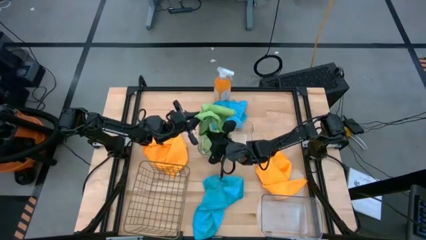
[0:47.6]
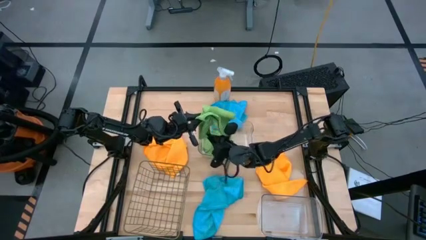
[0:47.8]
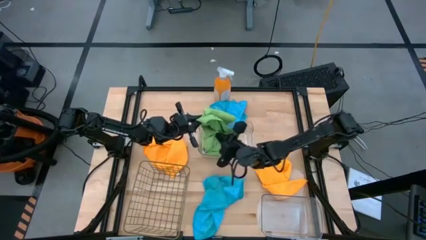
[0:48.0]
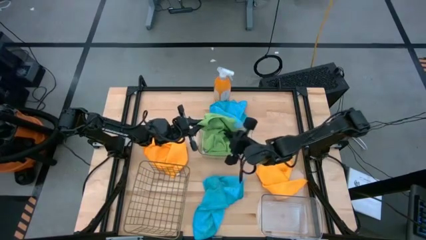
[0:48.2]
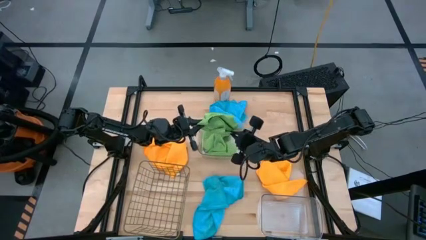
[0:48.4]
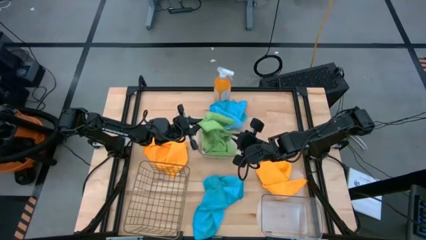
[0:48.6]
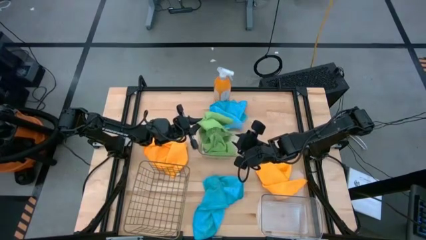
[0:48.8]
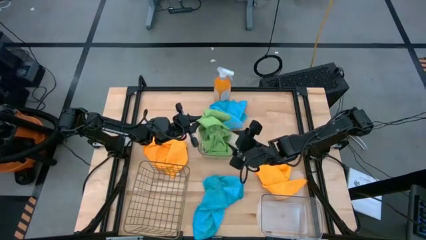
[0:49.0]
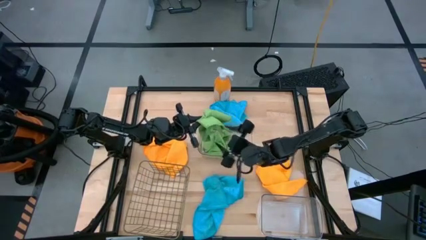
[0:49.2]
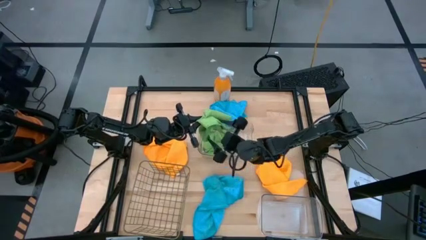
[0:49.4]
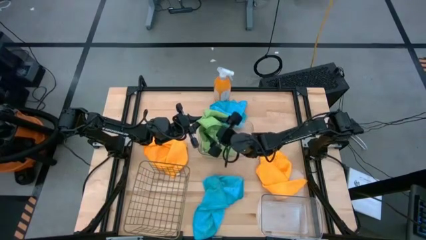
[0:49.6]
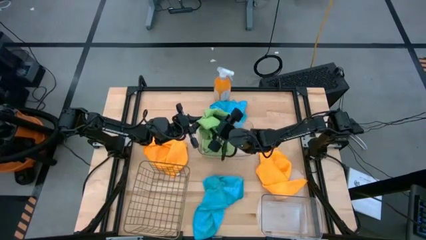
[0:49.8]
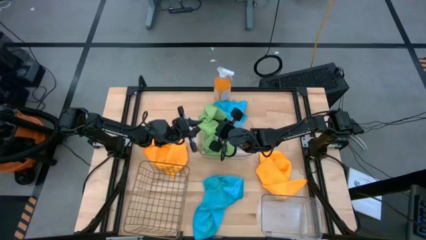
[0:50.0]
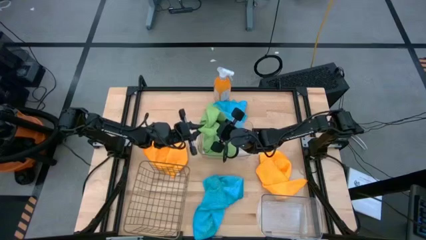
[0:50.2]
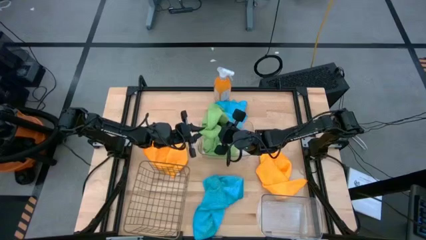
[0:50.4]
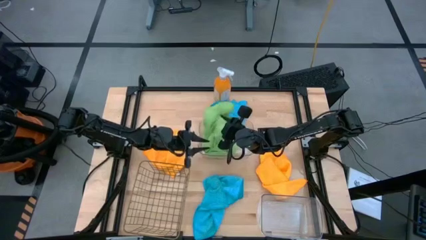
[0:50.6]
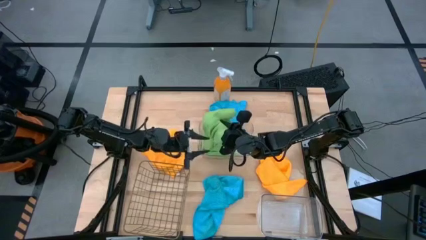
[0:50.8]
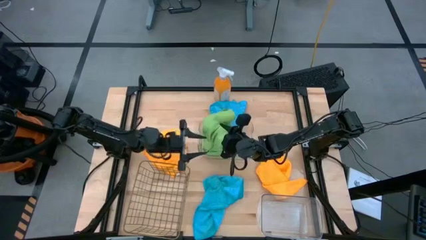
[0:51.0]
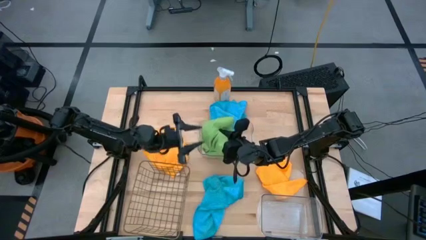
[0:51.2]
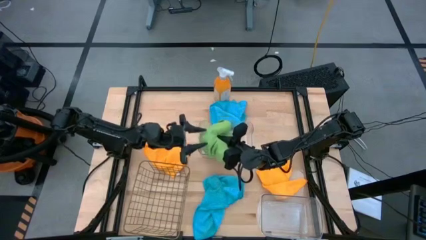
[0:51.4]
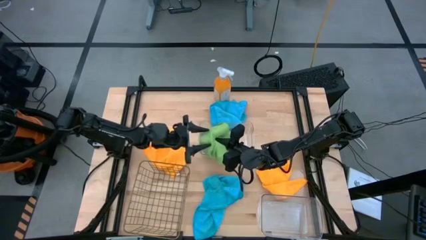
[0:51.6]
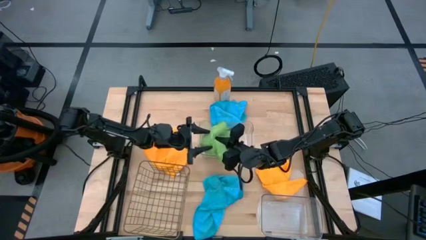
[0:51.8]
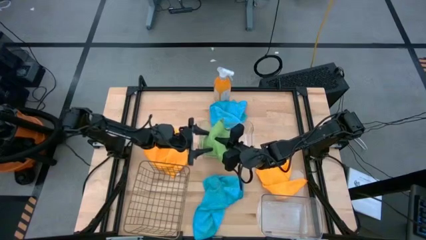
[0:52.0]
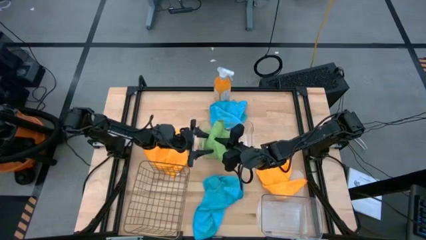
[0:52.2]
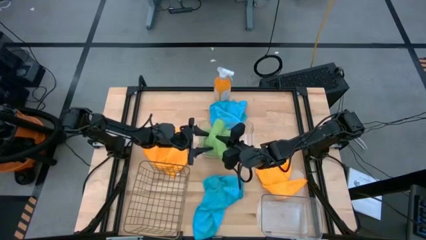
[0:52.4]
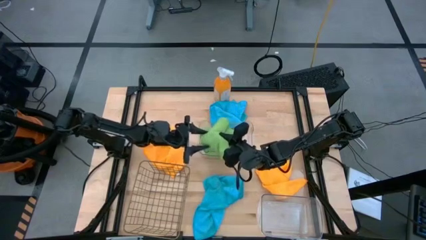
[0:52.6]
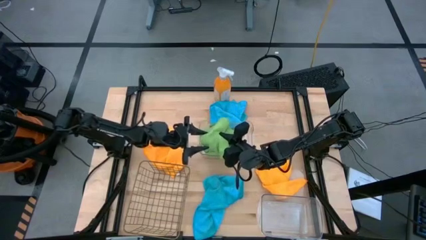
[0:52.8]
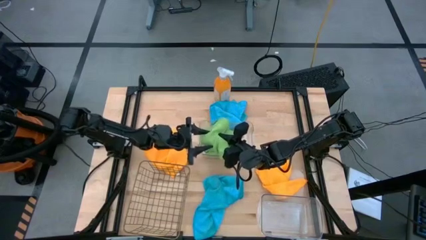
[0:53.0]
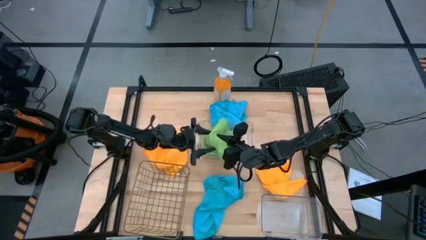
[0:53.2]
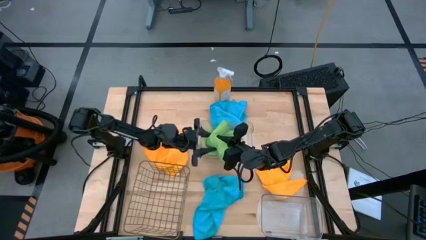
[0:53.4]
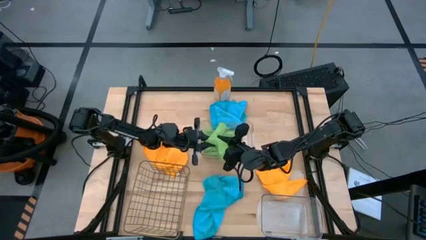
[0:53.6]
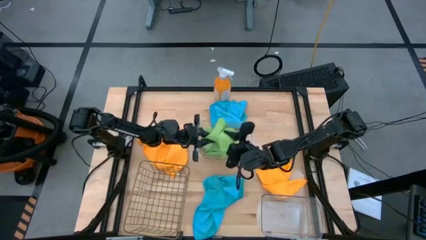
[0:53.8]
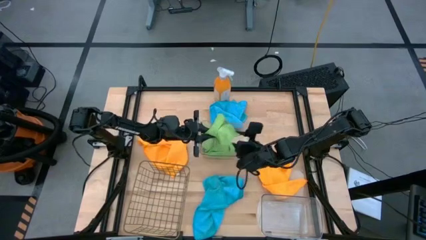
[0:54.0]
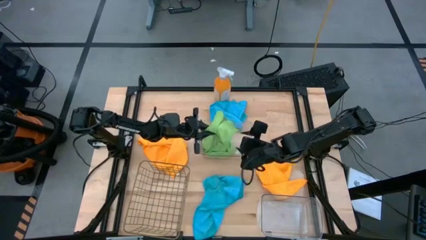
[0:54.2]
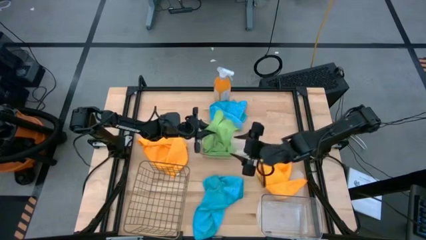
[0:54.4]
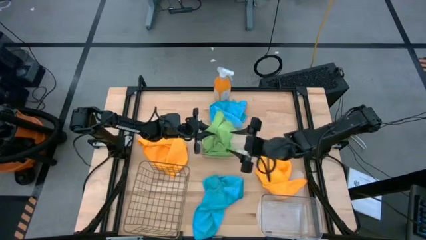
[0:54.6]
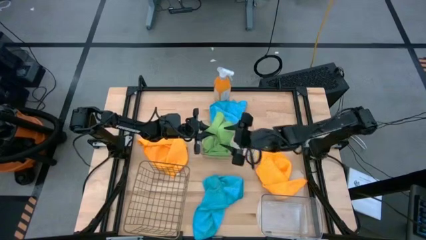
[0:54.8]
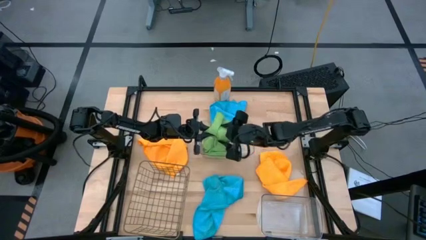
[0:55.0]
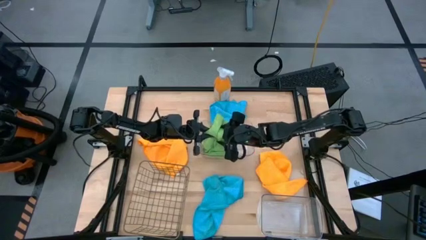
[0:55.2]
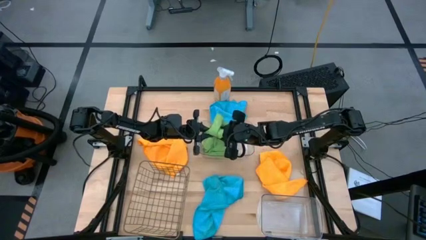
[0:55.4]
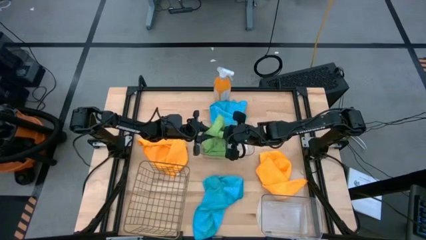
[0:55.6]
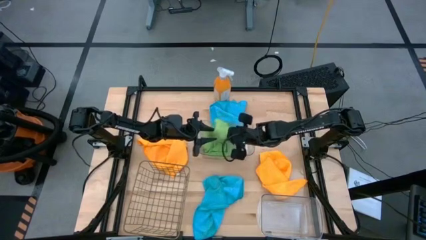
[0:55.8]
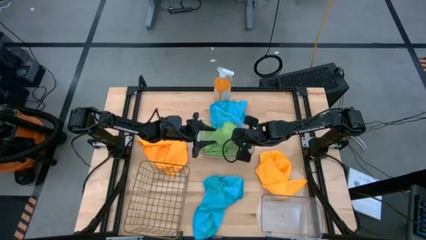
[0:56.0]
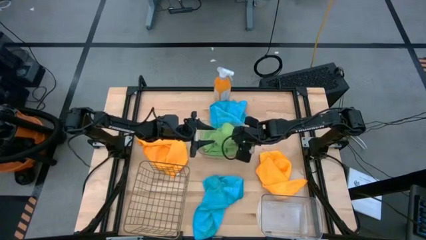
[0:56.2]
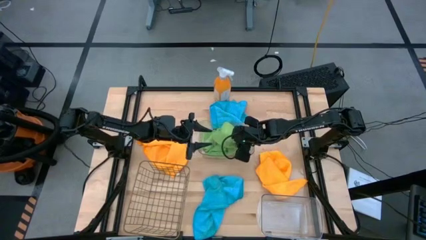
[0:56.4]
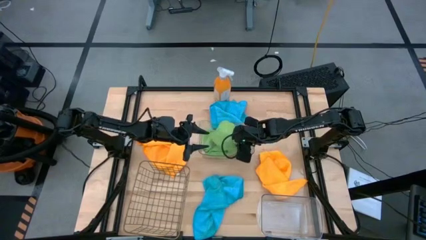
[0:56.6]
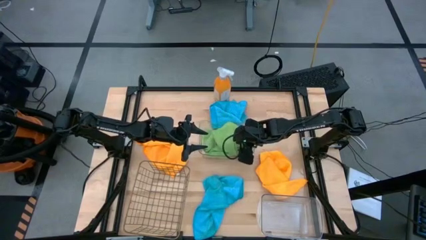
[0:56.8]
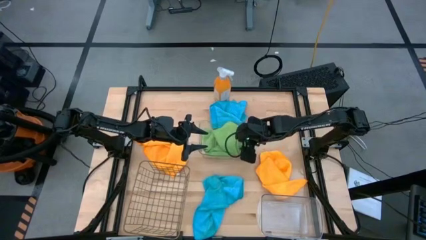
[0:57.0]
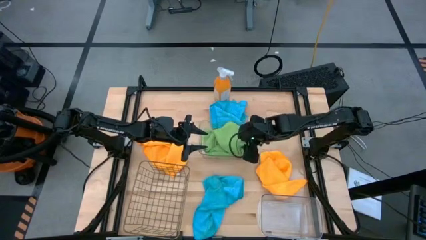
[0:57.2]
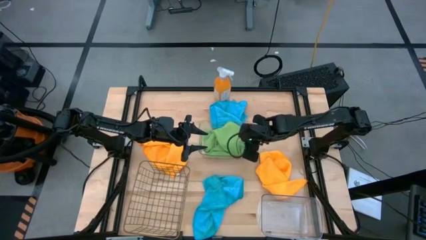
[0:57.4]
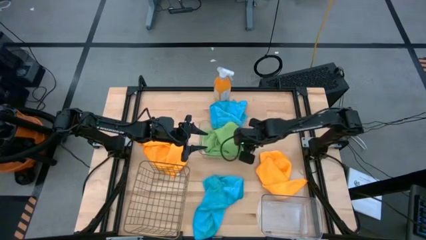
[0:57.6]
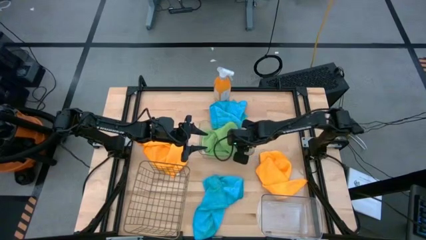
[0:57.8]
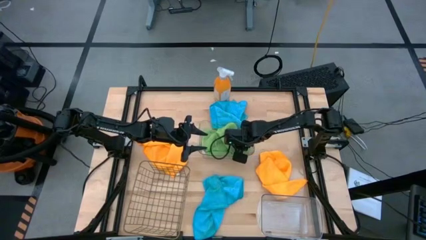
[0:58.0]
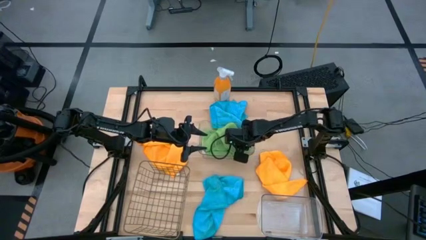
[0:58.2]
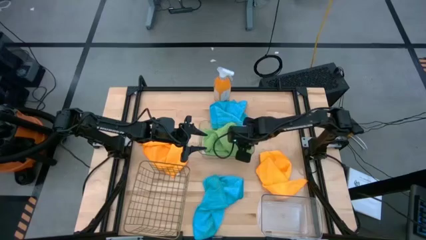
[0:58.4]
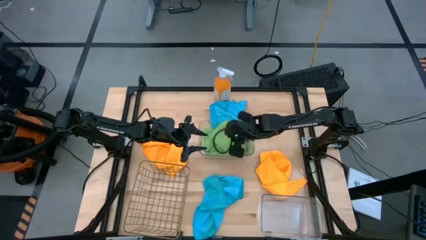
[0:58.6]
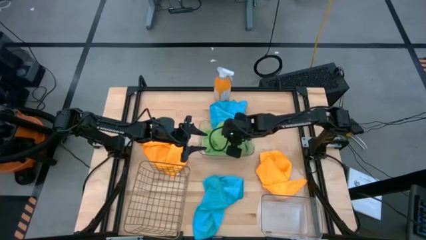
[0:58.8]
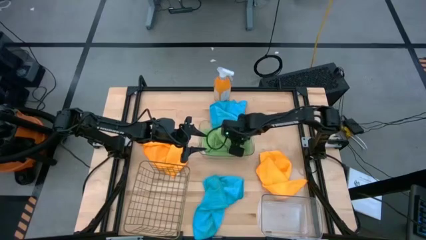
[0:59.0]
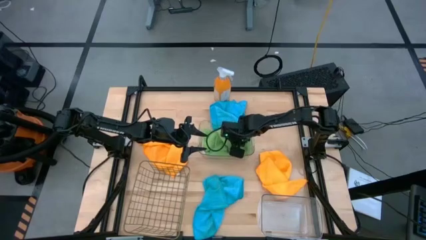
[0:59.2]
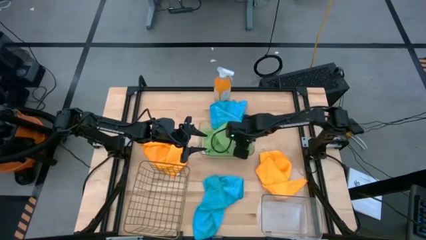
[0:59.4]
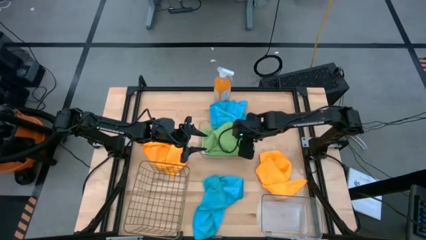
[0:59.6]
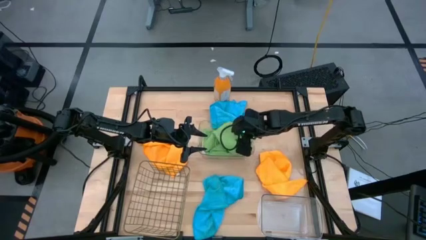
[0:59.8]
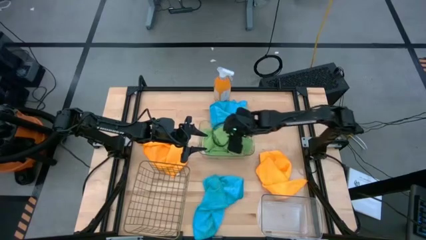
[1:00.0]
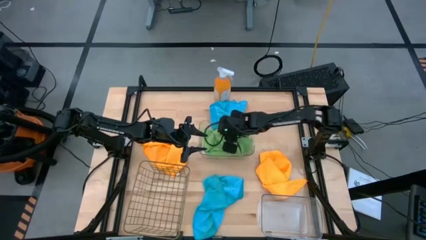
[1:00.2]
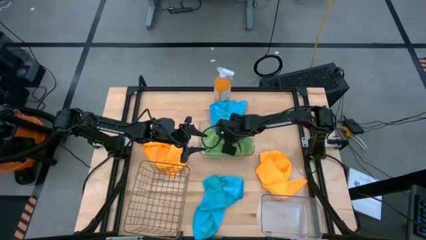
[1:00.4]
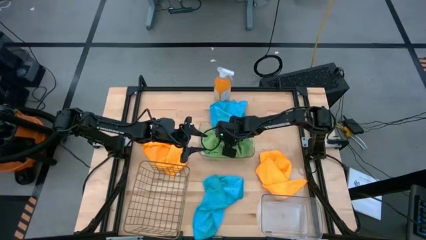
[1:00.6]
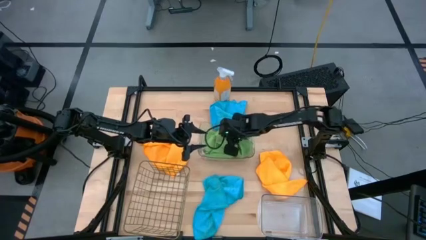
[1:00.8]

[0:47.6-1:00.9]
Task: Sort microfiber towel by color & place in baskets
Put the green towel into the top transparent bin

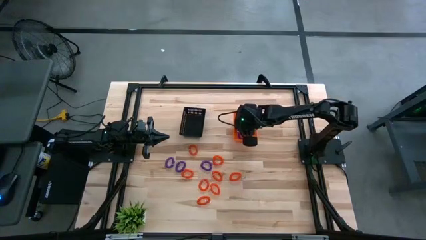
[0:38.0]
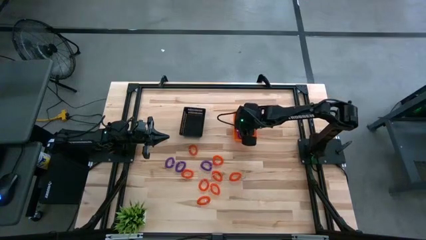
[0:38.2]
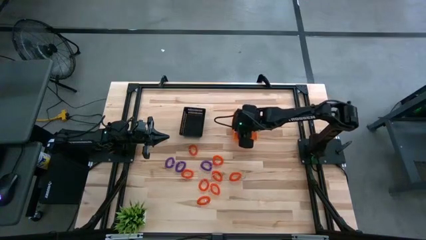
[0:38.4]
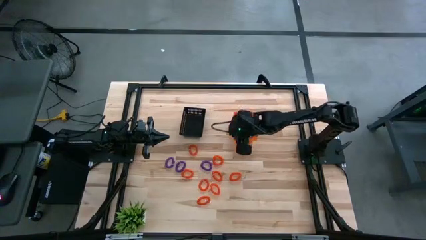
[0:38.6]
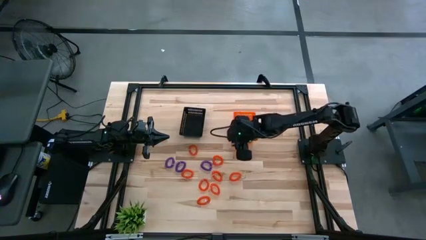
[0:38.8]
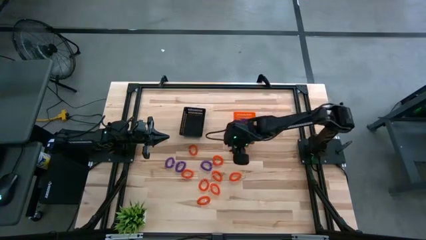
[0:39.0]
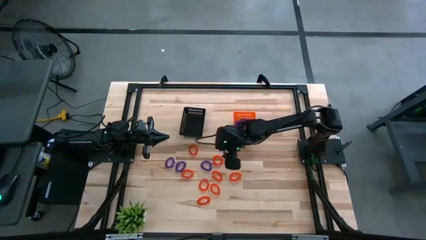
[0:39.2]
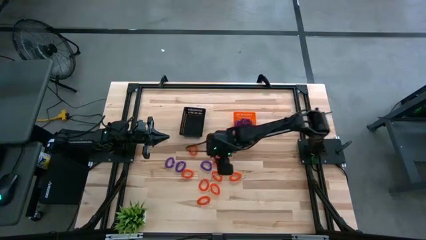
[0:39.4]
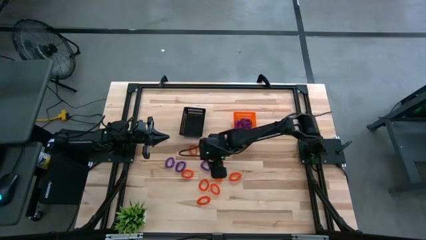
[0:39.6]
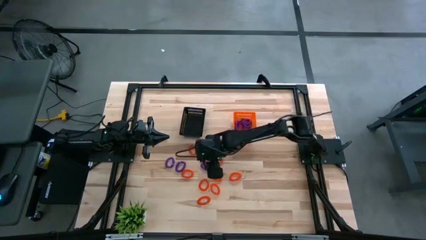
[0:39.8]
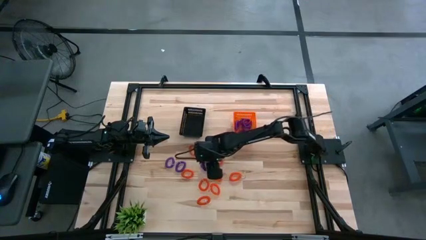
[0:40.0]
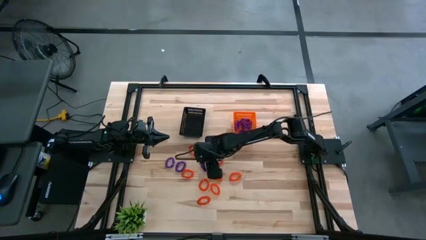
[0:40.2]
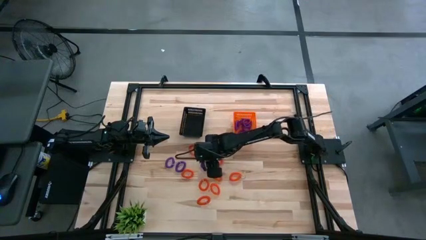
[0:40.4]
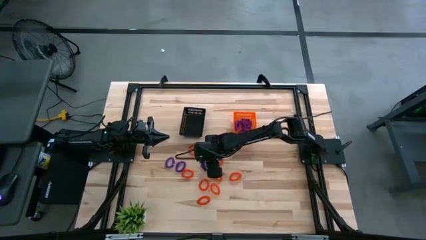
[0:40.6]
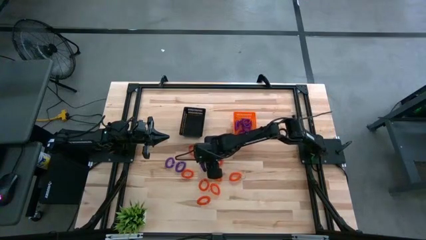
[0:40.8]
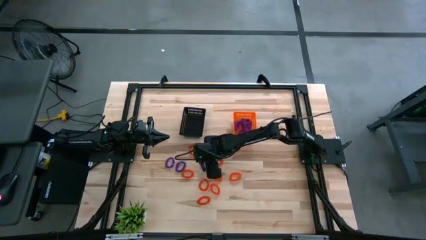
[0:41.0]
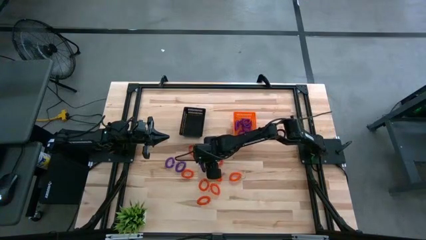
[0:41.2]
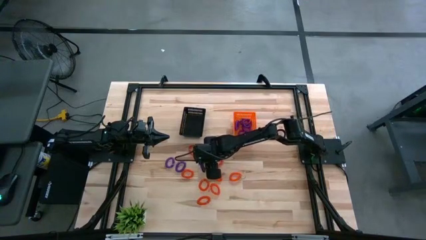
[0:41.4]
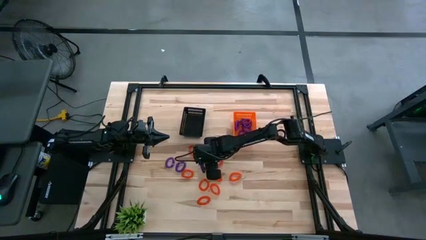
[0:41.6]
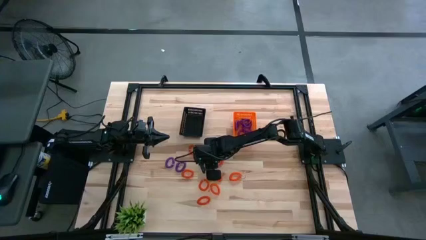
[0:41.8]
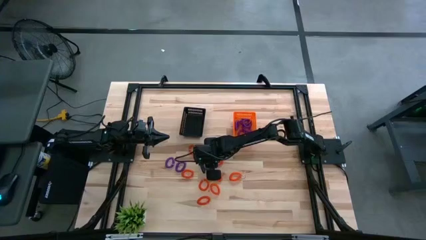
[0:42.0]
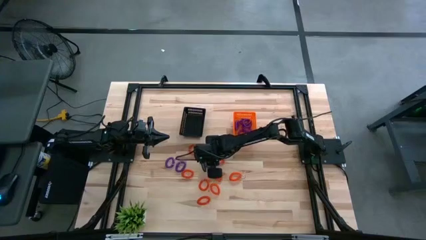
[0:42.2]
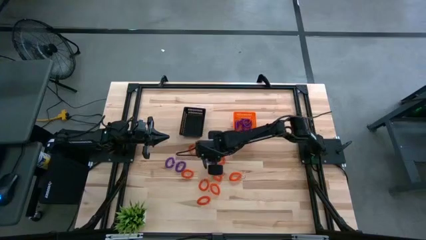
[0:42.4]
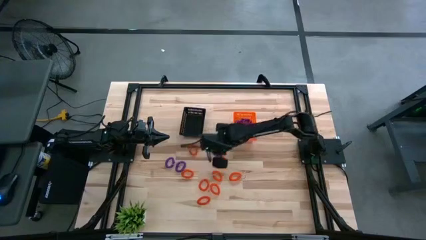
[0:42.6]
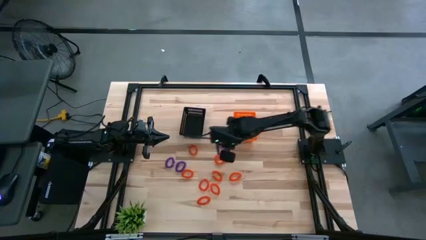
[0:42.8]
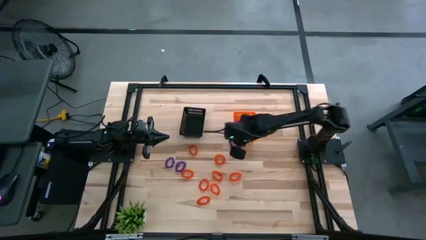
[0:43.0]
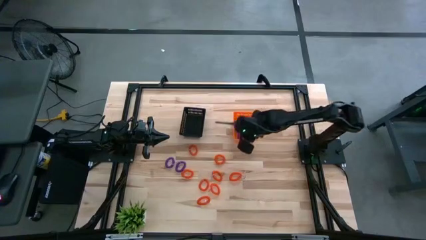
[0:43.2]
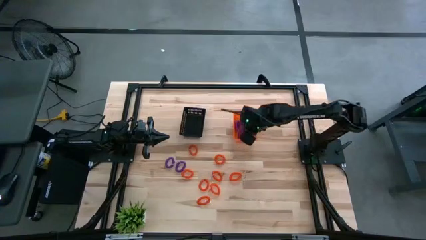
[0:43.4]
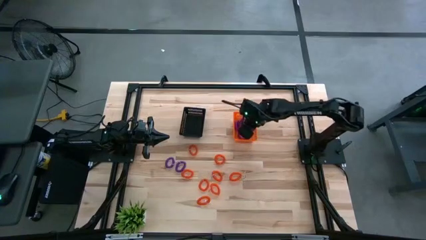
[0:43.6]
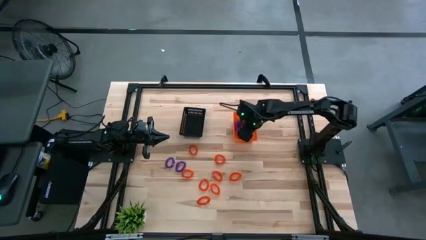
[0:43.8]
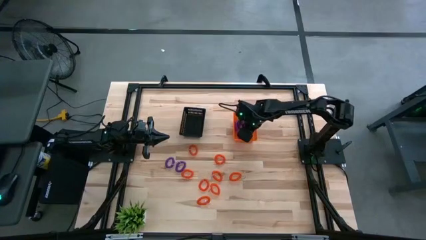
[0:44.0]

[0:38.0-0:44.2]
Task: Sort spring keychains into baskets
Put the violet spring keychain into the orange basket
